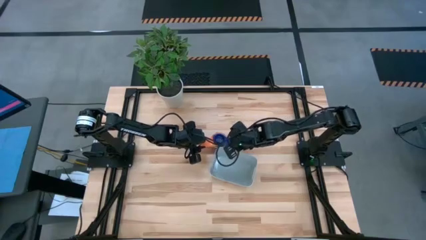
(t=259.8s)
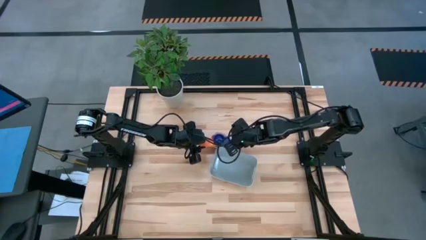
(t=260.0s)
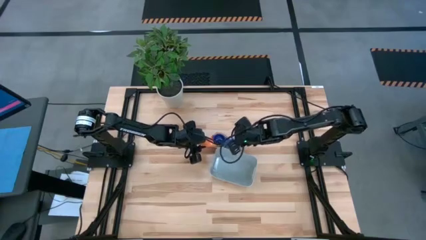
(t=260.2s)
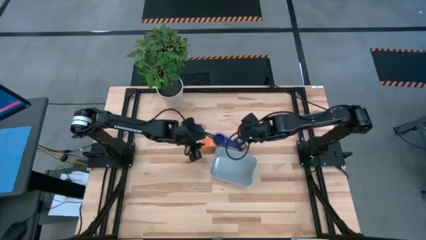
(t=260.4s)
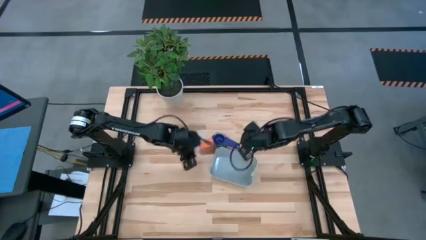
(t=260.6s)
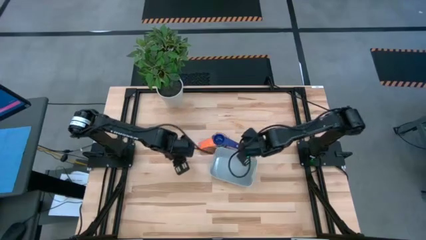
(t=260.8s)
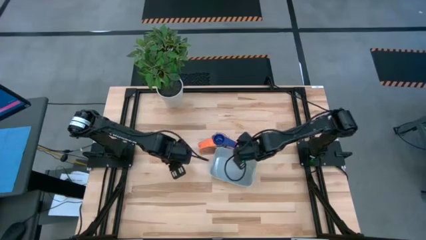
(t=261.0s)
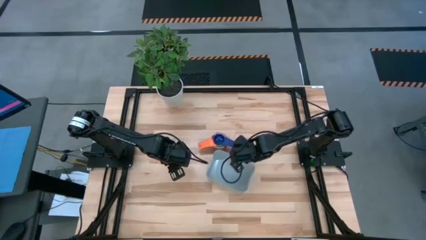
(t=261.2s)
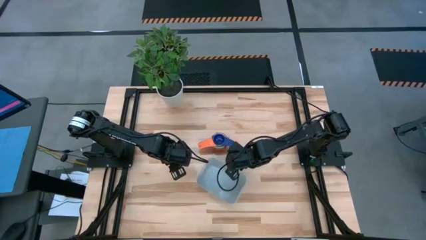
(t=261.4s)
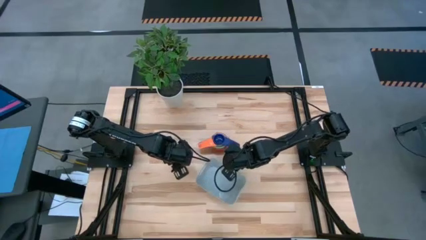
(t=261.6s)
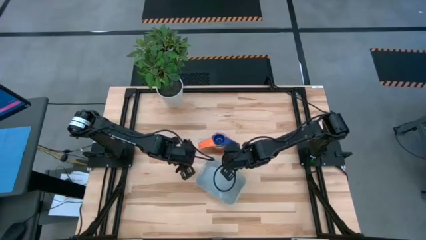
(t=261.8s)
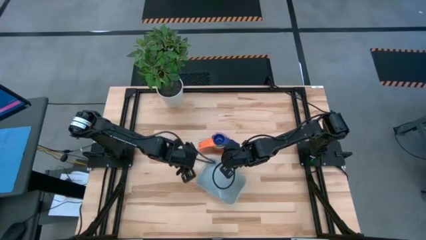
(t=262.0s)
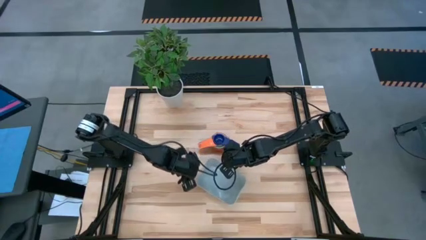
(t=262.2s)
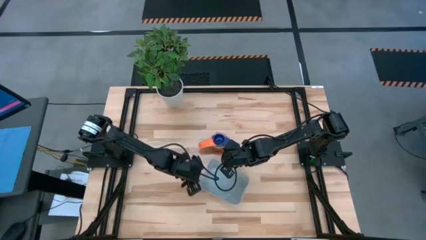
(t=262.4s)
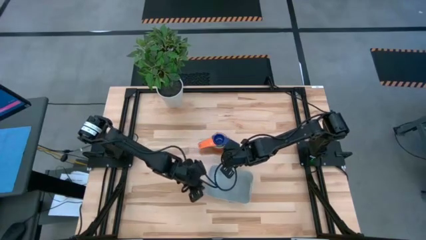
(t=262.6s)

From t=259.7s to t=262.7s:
Task: Nest measuring cups in basket
Adjust the gray bin

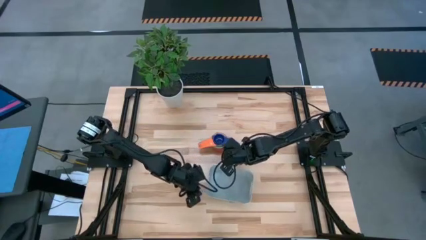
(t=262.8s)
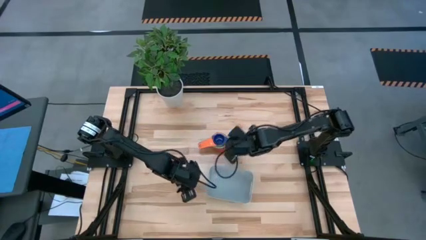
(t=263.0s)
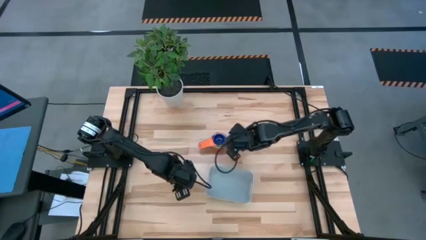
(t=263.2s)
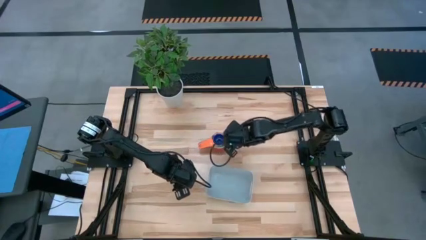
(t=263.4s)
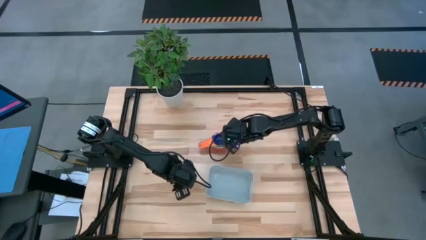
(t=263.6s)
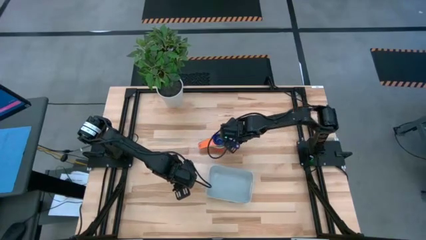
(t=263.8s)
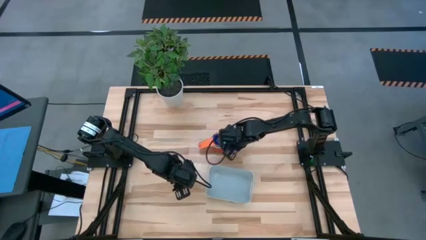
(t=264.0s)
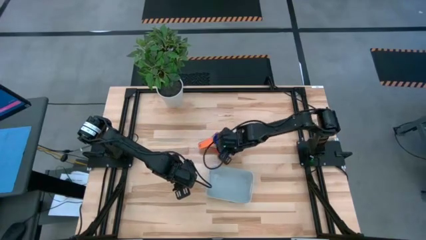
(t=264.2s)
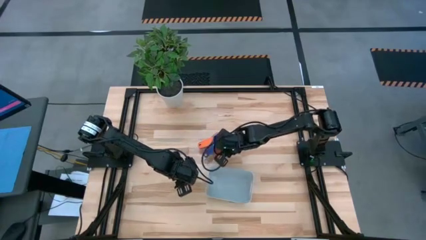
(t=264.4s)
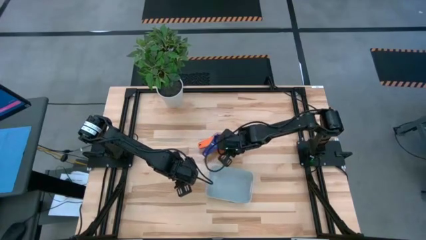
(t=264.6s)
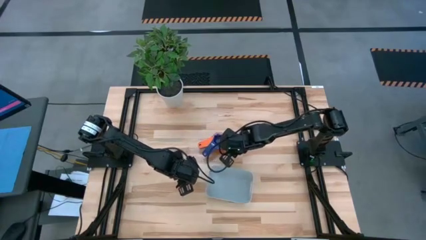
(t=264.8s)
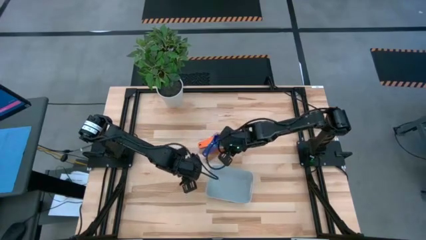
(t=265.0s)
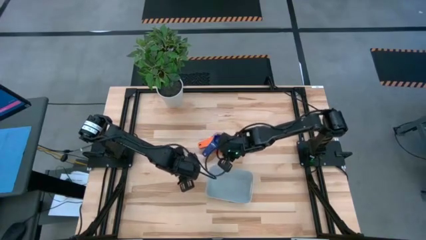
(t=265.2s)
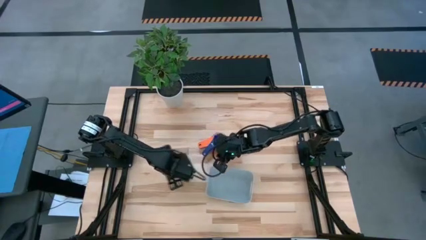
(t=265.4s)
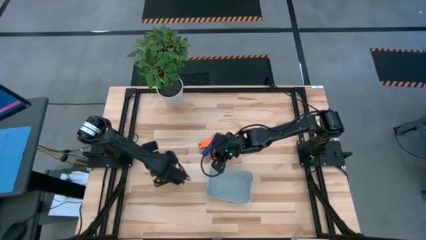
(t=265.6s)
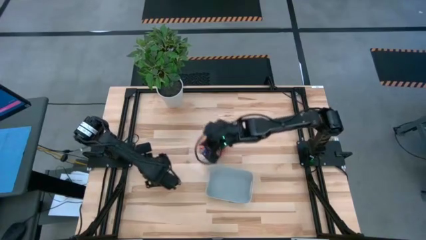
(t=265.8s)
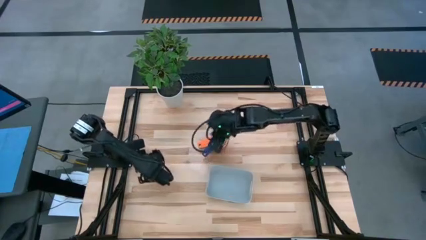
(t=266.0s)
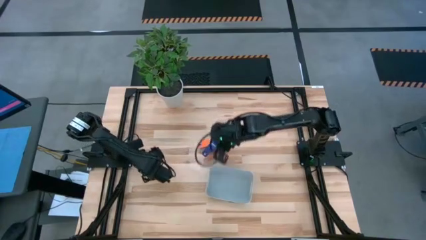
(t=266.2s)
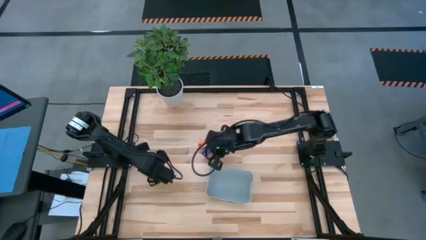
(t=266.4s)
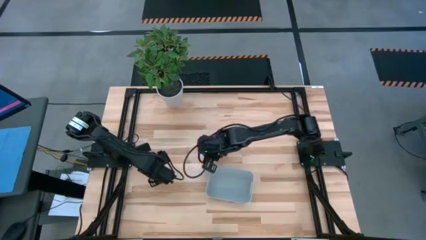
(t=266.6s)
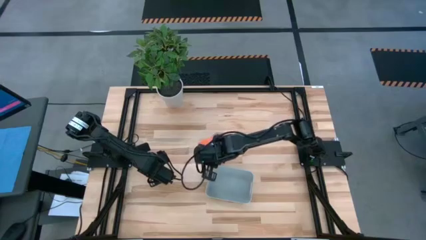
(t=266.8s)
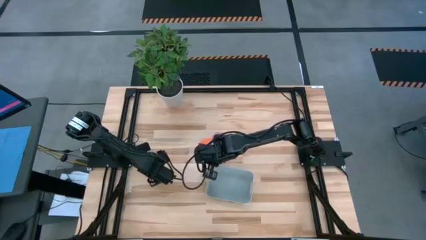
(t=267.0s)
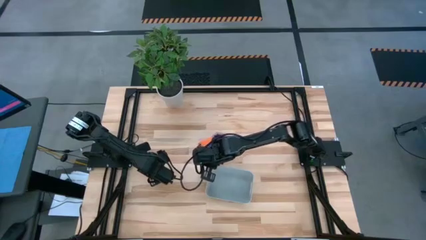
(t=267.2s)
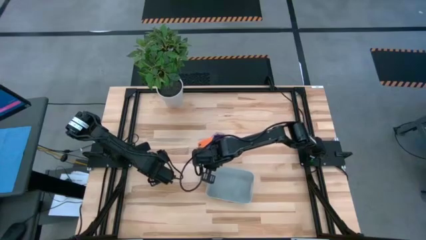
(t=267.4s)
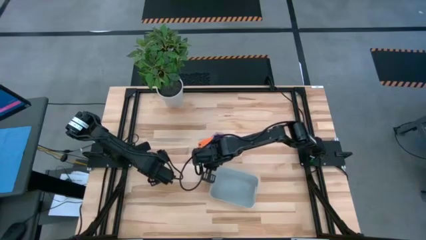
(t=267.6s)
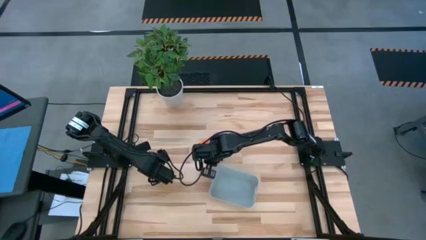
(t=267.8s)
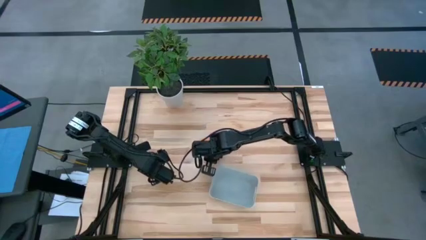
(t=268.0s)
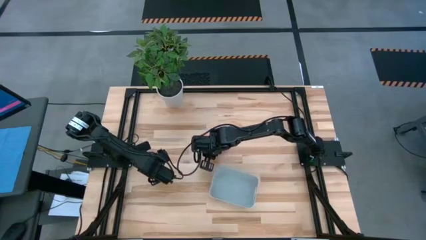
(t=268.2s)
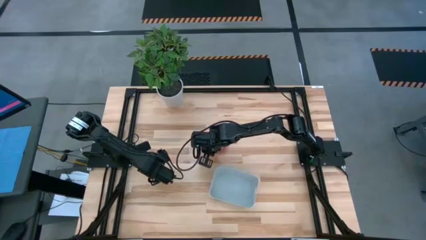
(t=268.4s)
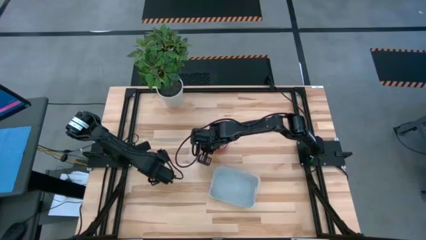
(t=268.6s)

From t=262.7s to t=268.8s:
Adjust the dark blue measuring cup

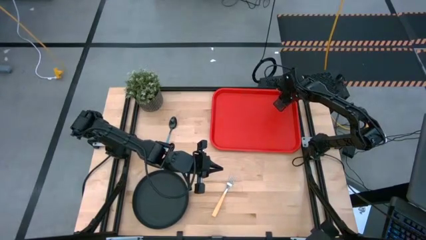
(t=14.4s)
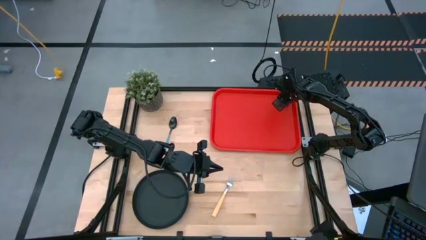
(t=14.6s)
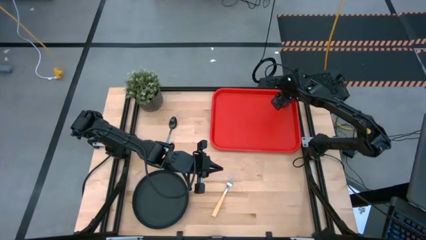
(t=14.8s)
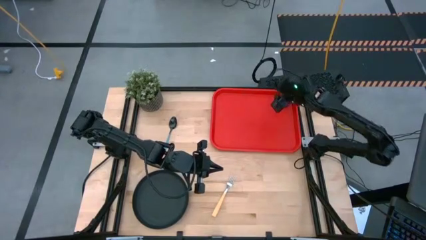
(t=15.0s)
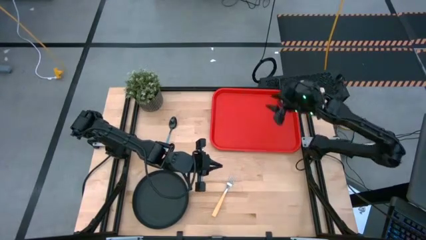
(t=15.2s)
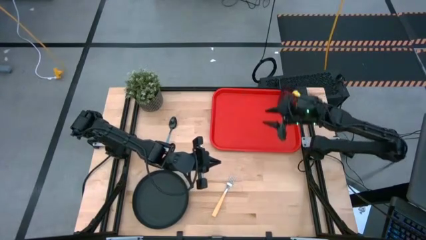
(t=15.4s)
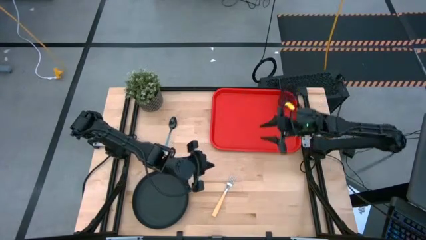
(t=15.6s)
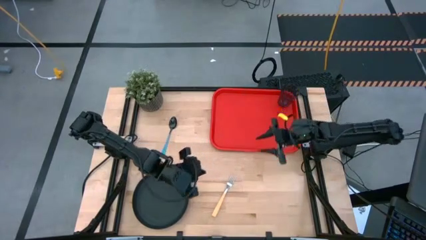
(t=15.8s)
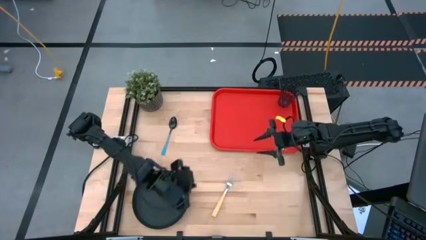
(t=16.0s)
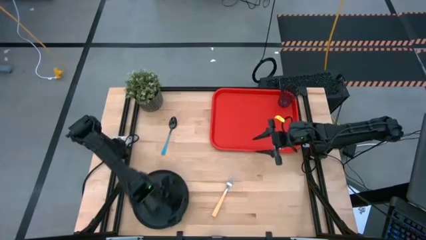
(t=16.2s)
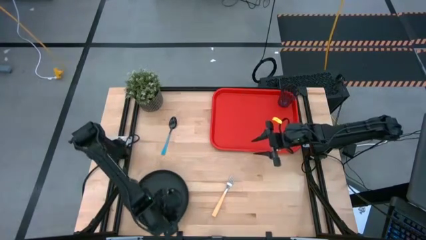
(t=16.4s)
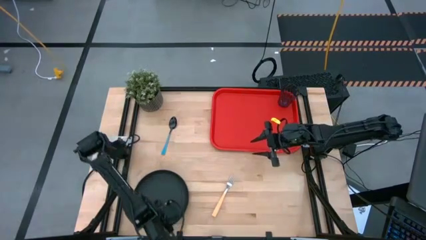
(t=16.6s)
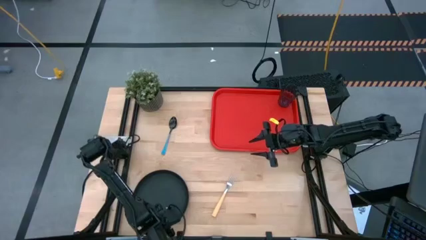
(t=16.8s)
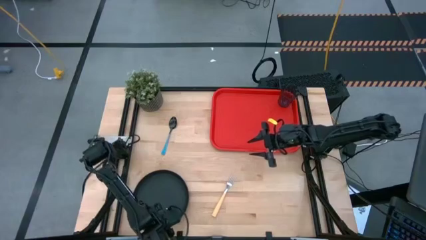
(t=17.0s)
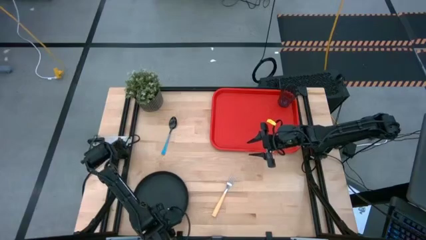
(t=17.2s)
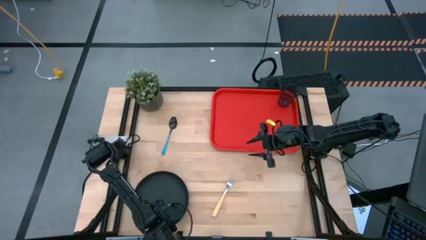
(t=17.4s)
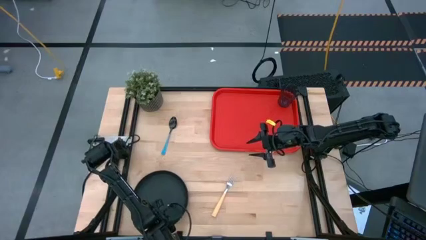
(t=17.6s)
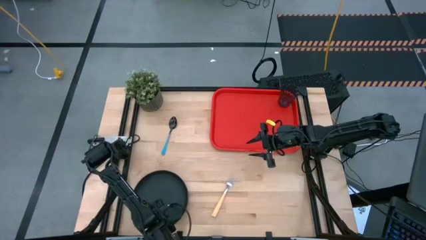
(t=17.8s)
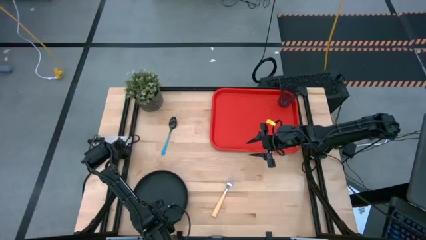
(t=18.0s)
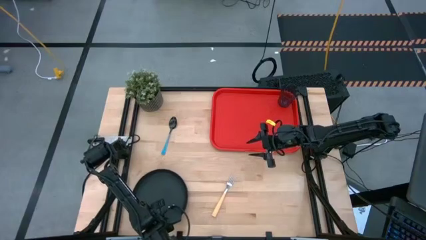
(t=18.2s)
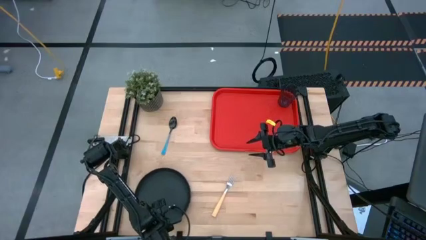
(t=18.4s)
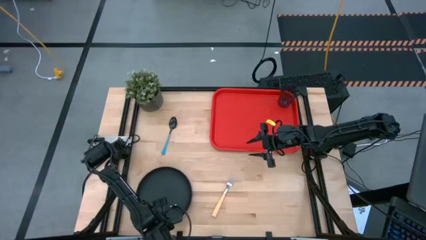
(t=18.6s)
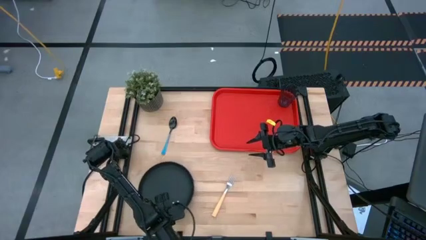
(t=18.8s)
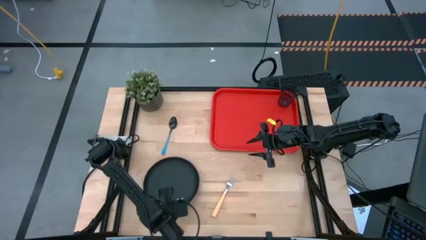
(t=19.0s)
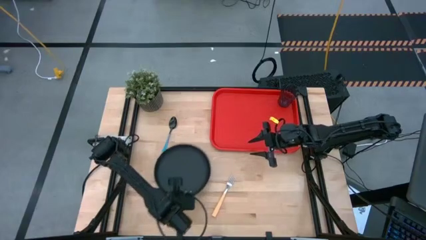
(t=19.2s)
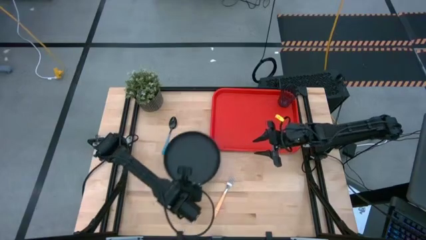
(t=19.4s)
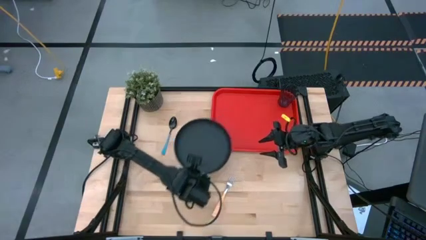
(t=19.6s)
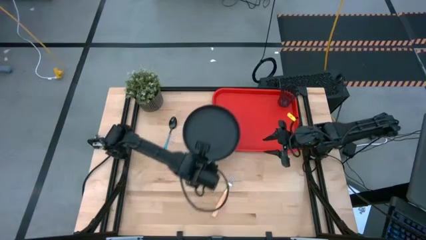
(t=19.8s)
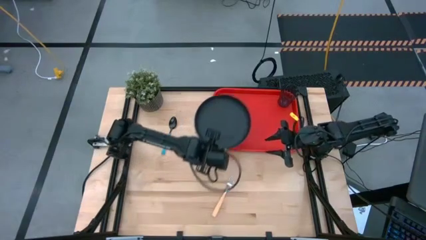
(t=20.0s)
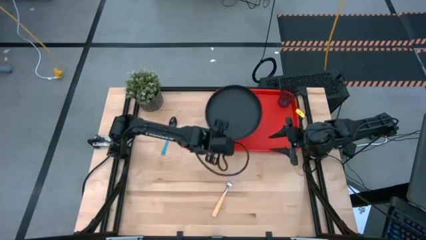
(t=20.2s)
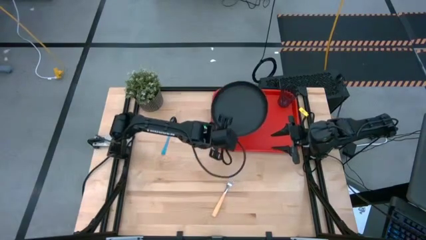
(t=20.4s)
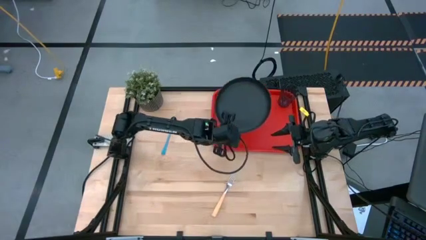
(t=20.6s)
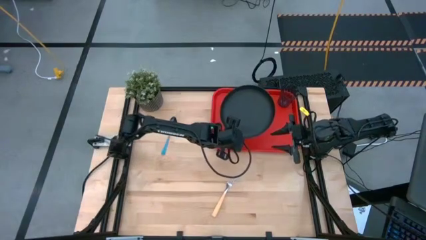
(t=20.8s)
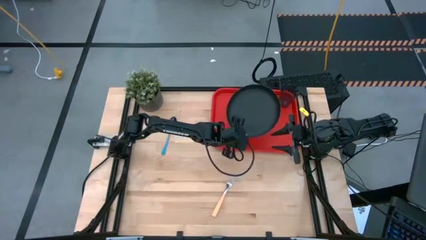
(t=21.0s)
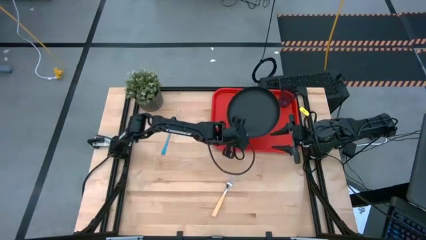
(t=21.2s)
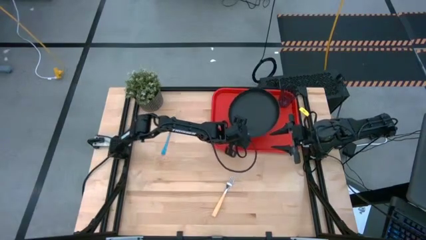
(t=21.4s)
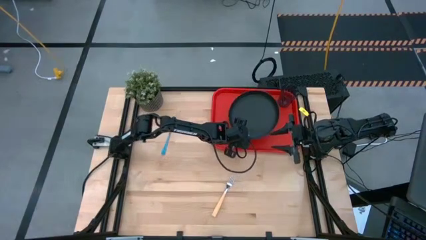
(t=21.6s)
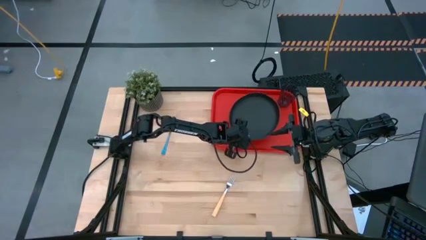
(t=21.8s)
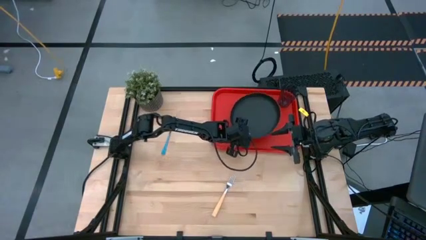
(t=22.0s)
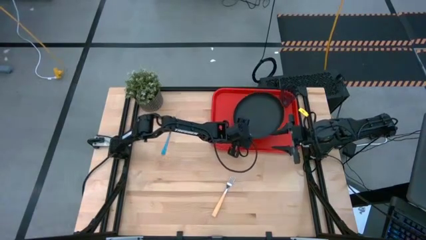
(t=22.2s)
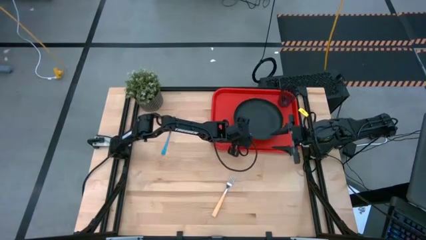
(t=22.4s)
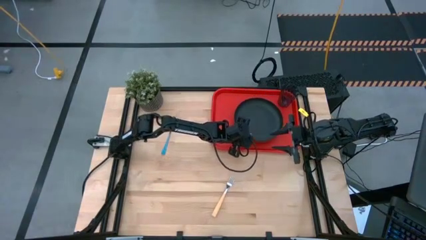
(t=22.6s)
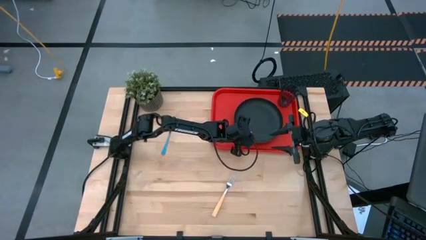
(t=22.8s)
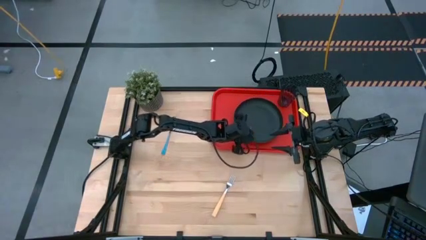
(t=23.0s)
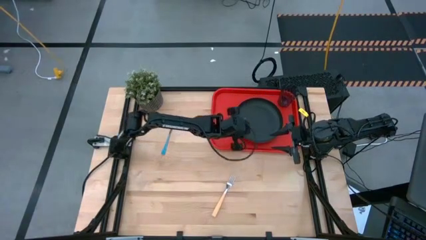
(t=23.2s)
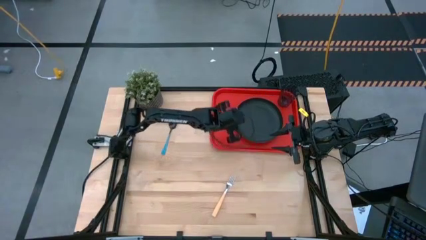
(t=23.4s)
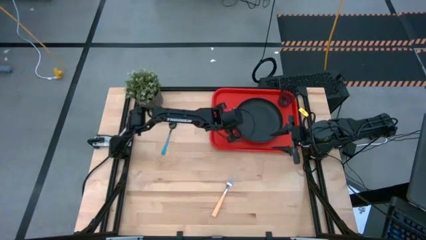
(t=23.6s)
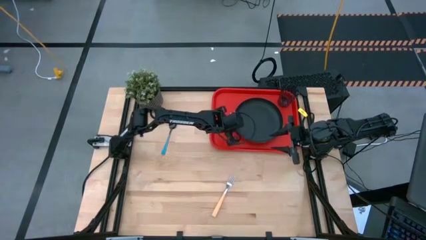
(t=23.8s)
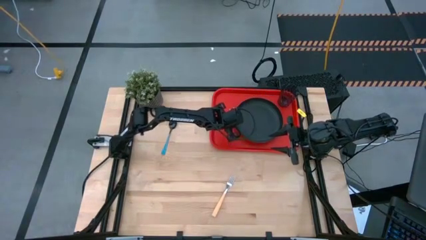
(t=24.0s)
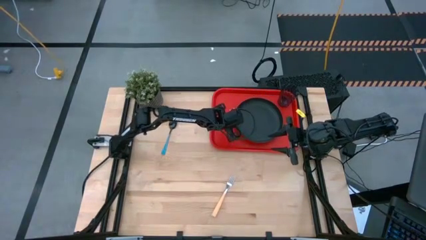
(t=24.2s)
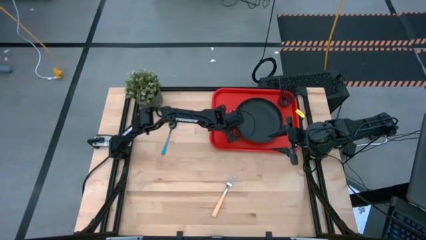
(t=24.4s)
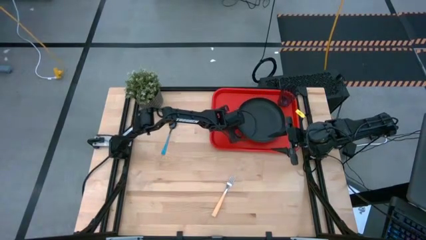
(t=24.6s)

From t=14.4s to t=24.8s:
Task: Pick and place plate/cup/fork/spoon on tray
Put the black plate on the red tray
